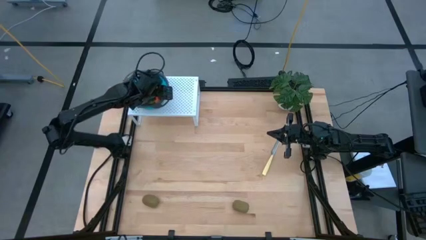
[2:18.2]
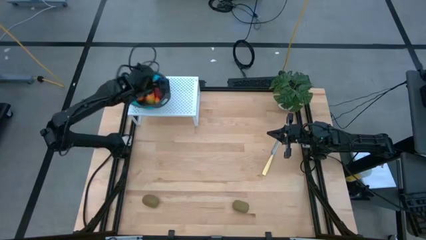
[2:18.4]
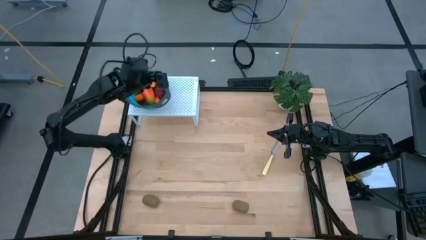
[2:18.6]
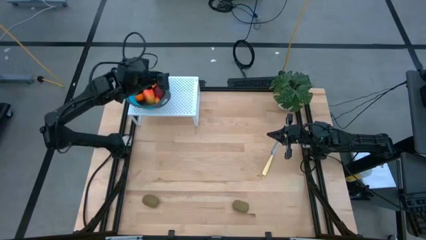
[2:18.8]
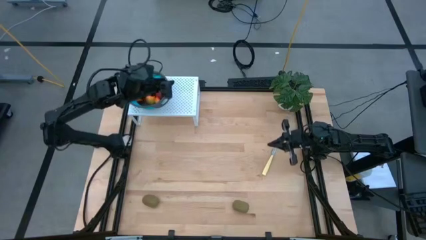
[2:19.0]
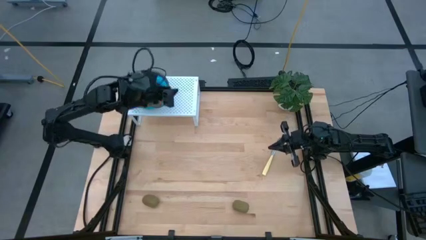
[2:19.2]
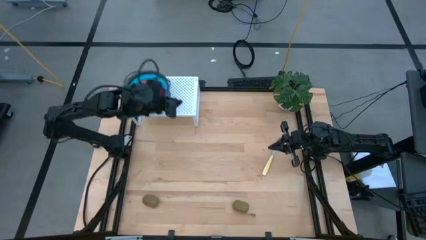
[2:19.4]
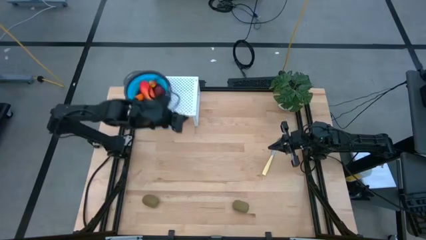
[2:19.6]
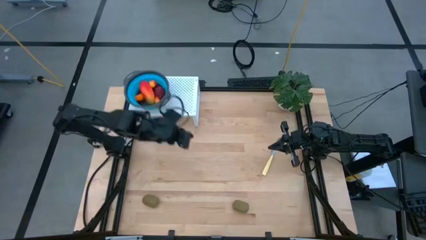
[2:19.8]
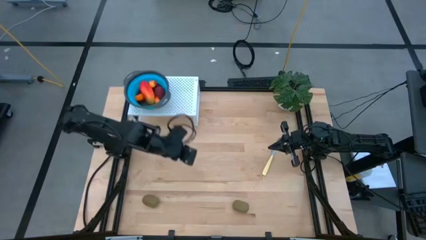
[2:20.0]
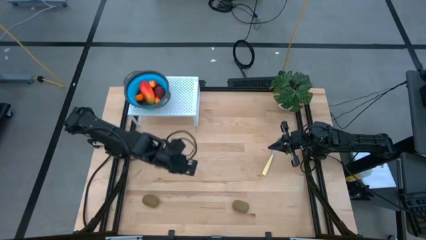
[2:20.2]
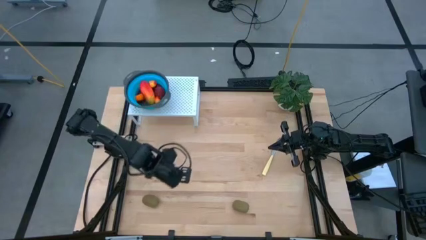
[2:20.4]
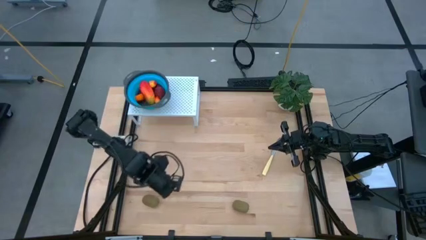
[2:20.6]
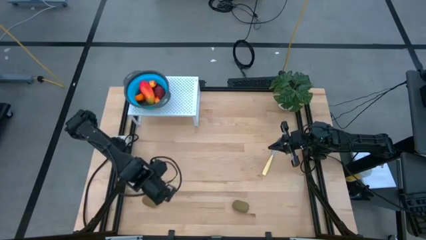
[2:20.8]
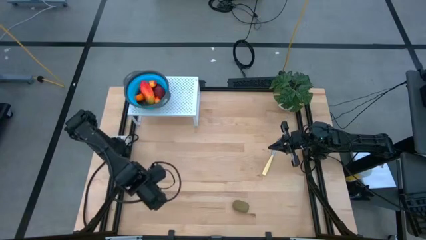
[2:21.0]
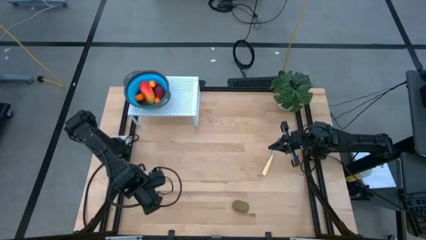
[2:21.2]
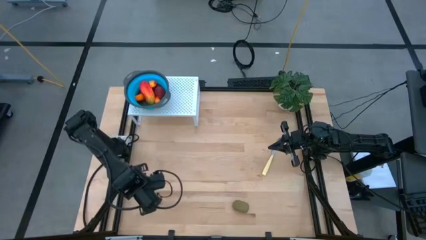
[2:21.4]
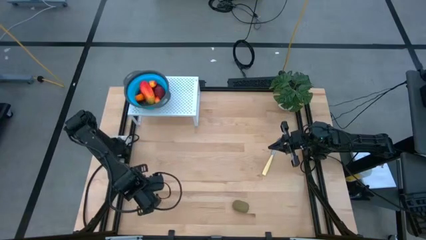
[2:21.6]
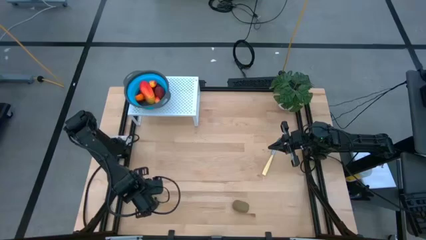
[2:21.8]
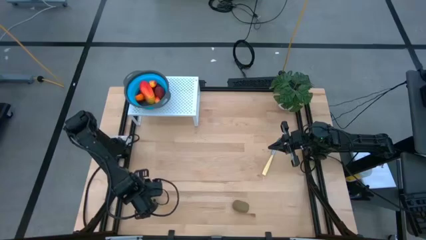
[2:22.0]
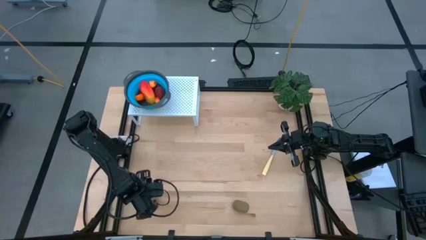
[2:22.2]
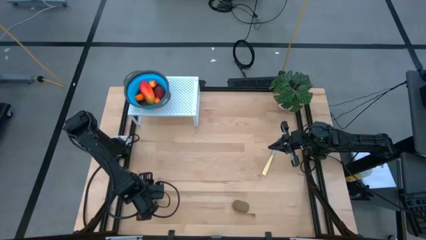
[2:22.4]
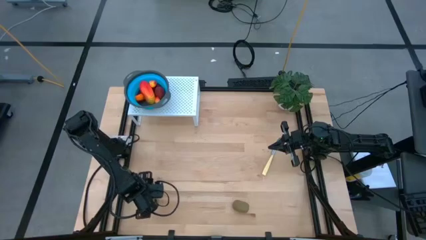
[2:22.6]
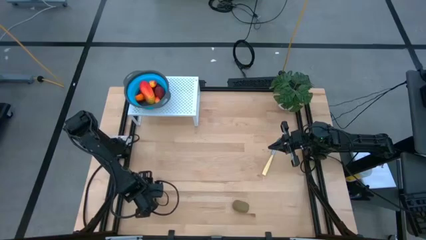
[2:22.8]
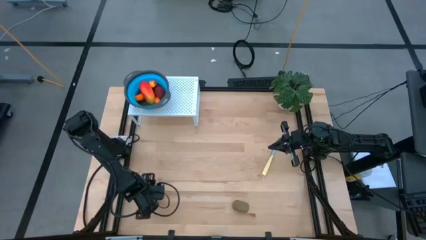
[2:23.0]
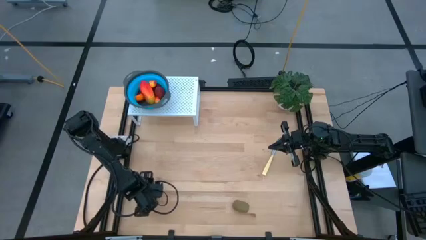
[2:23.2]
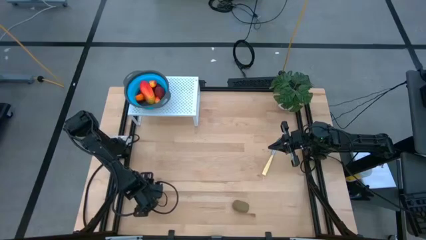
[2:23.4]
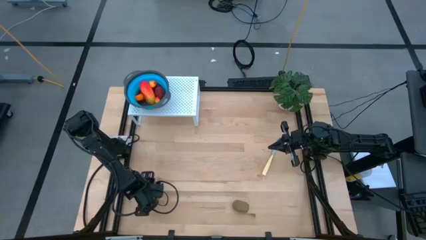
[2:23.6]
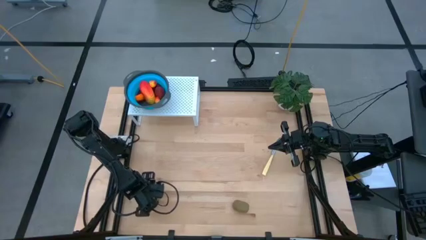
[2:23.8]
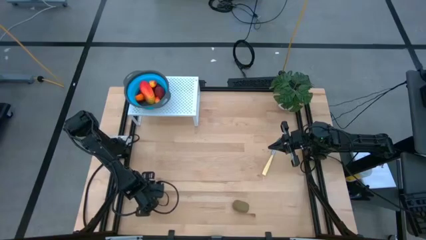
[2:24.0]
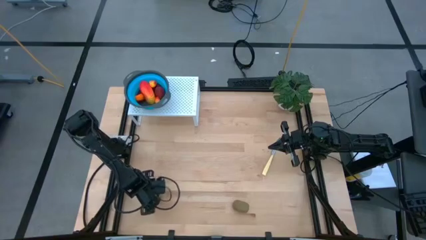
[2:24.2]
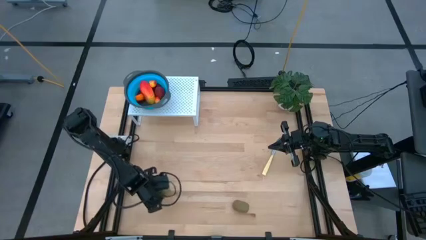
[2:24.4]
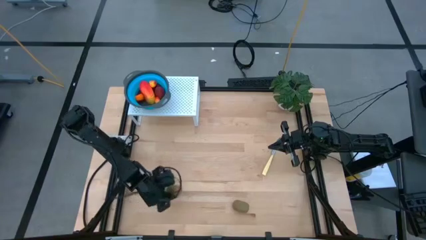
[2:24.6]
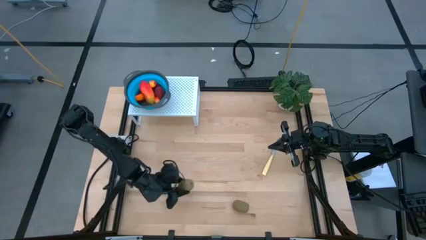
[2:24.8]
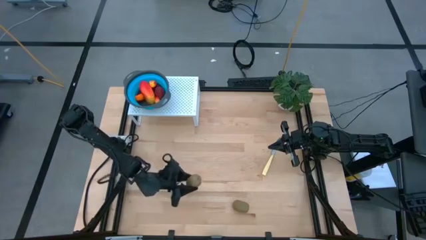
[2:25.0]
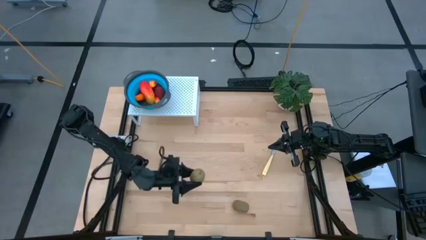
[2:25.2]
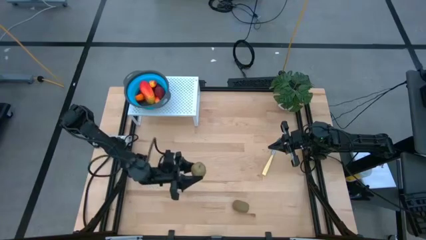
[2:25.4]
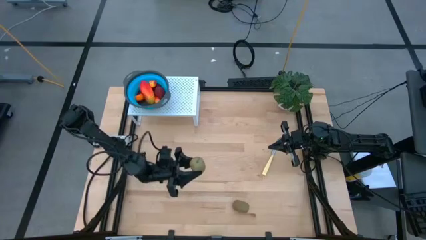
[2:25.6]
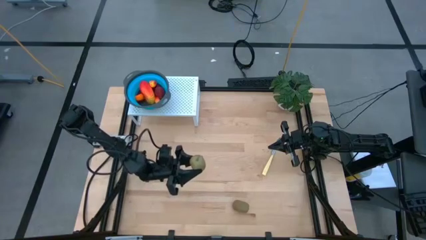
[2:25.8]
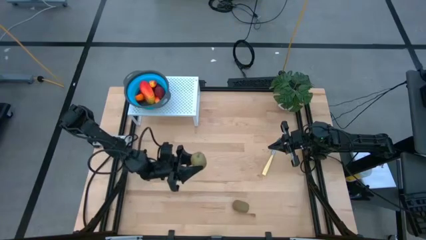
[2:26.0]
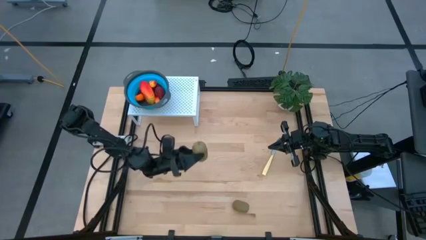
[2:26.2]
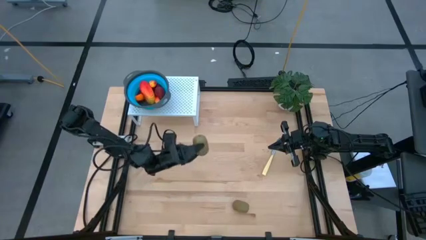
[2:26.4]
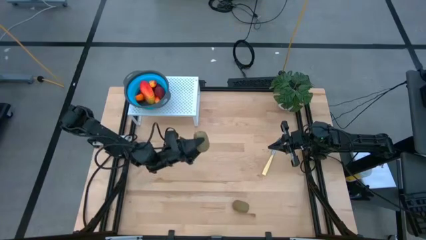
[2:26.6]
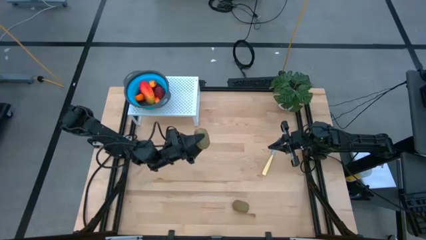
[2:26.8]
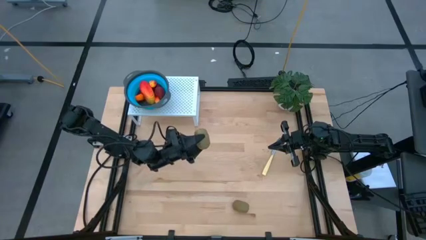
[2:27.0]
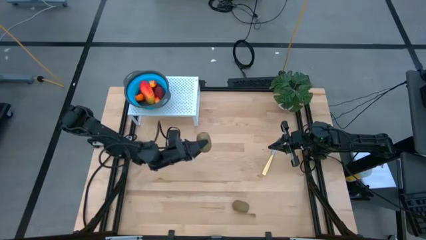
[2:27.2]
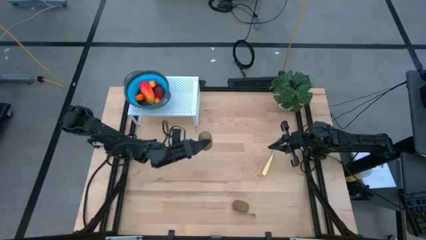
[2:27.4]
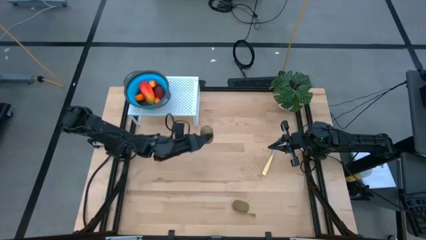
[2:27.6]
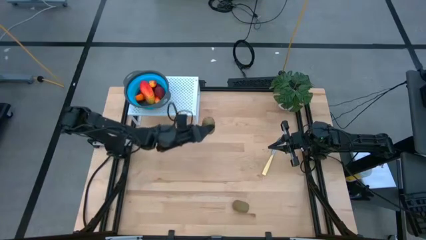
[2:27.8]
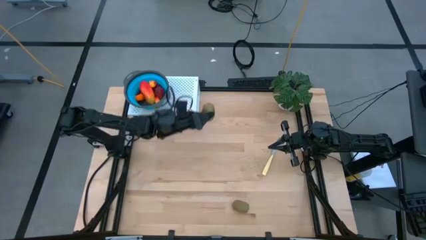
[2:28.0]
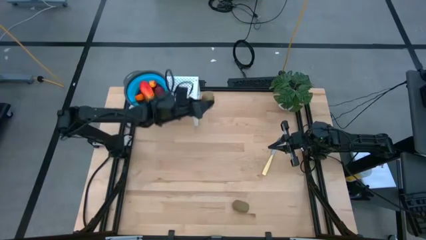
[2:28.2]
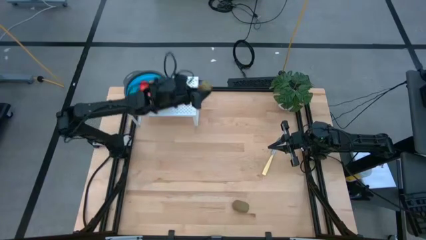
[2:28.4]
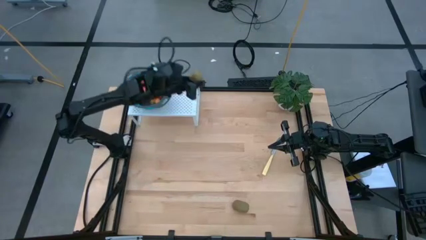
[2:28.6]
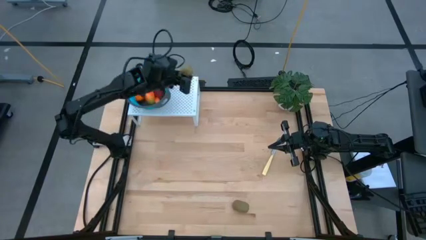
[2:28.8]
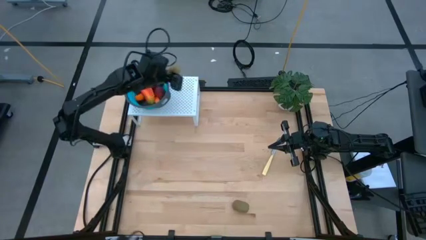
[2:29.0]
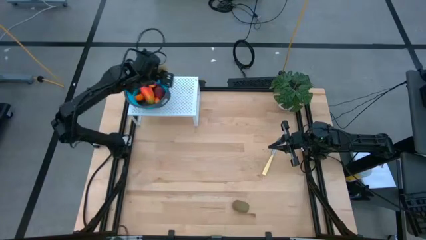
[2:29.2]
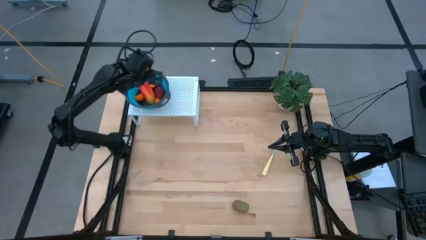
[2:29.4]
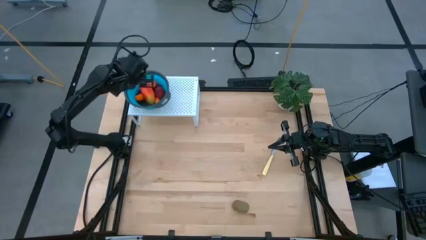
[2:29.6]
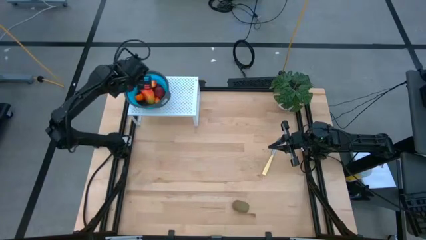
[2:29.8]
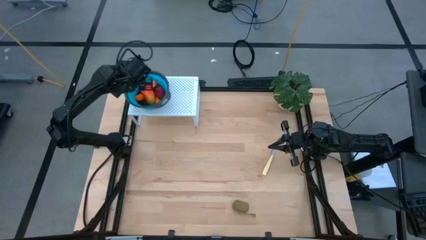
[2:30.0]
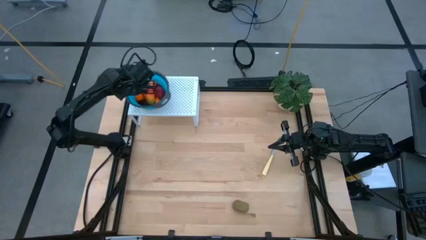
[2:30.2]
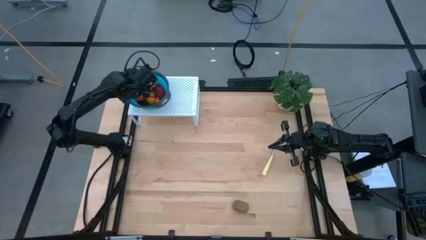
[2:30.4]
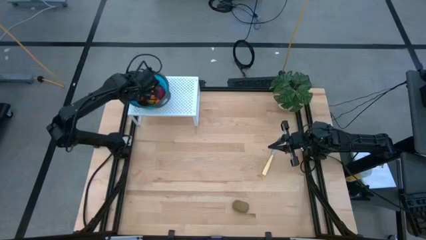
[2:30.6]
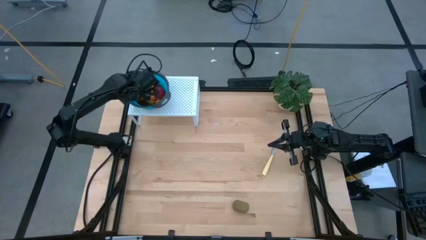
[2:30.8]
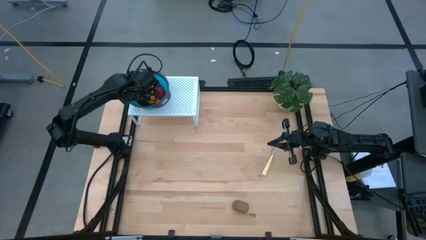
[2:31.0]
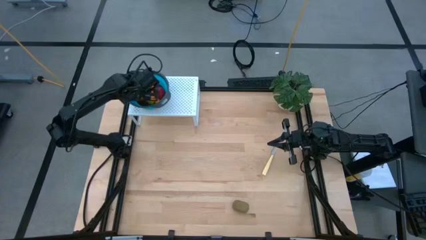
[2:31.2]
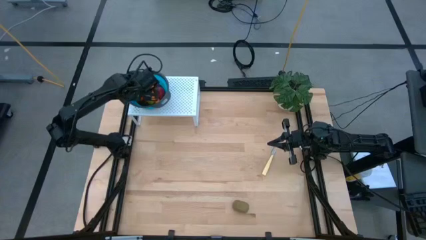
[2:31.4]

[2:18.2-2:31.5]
Task: Pick & Place Fruit
Put the left kiwi into the blue strainer bowl on the shelf

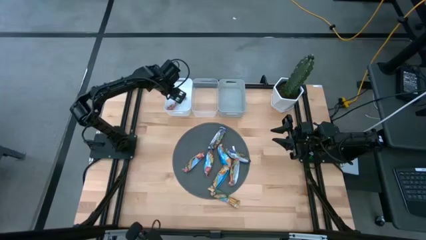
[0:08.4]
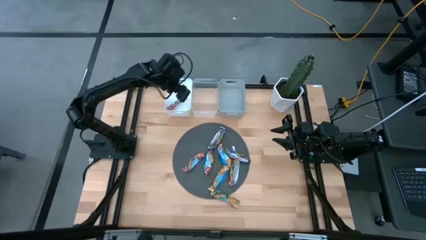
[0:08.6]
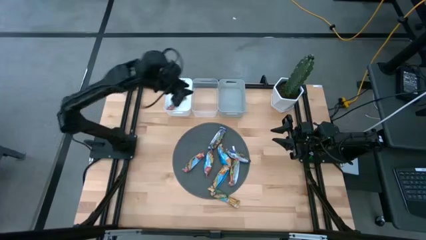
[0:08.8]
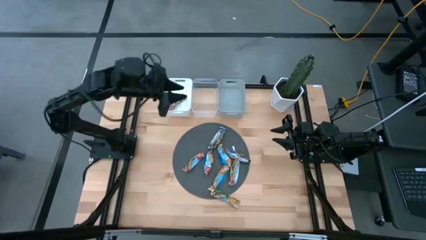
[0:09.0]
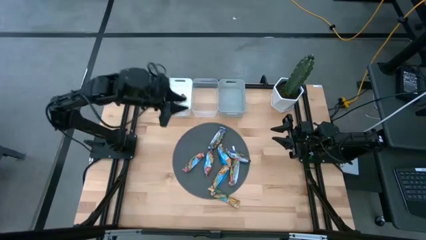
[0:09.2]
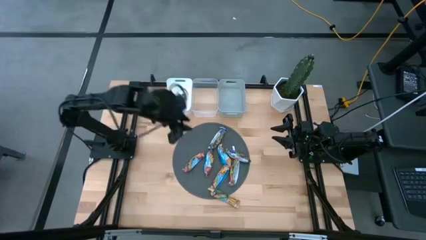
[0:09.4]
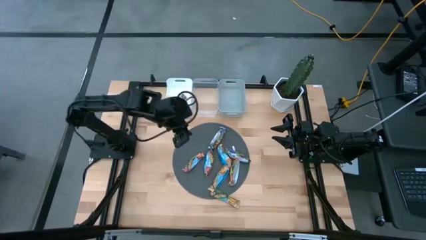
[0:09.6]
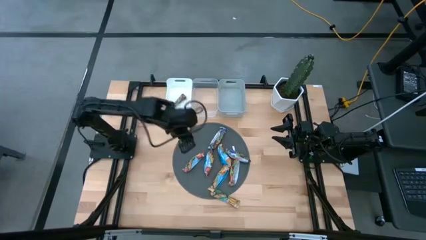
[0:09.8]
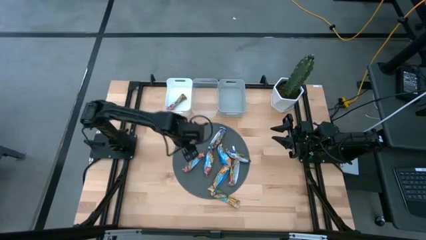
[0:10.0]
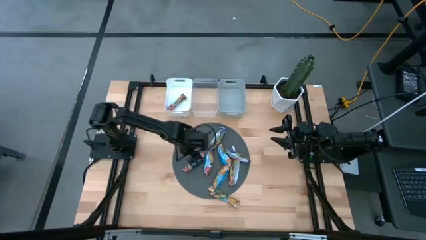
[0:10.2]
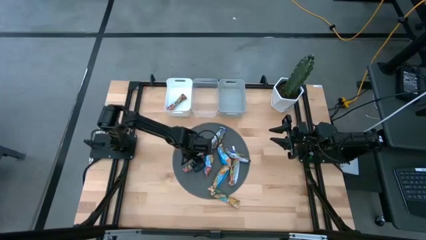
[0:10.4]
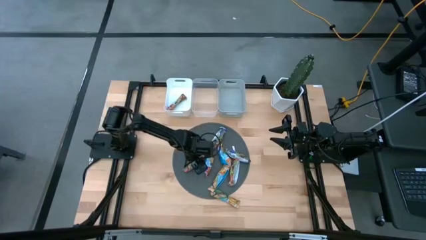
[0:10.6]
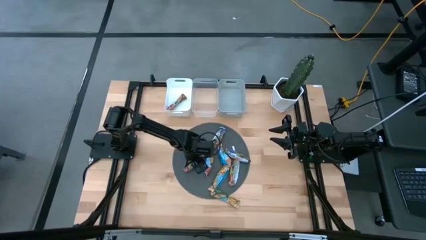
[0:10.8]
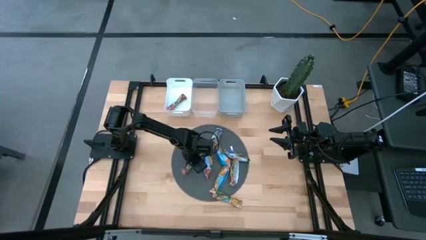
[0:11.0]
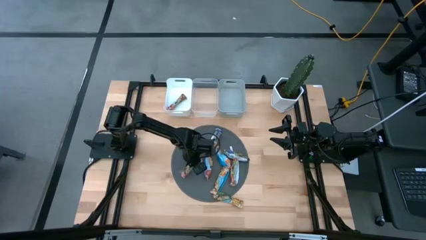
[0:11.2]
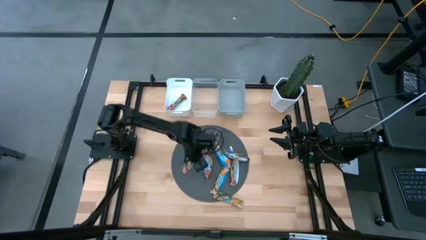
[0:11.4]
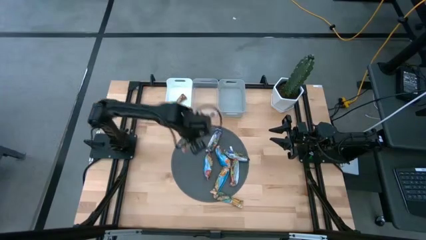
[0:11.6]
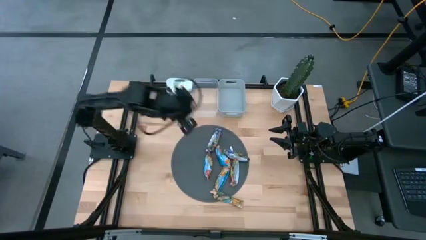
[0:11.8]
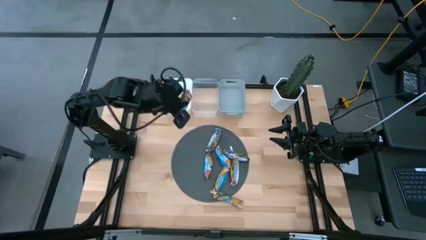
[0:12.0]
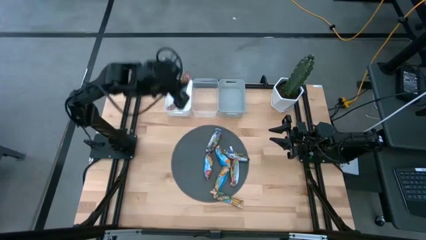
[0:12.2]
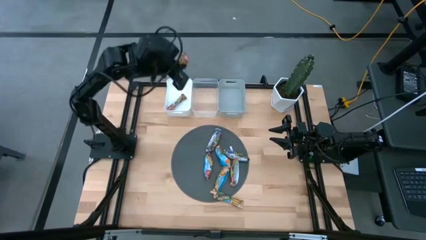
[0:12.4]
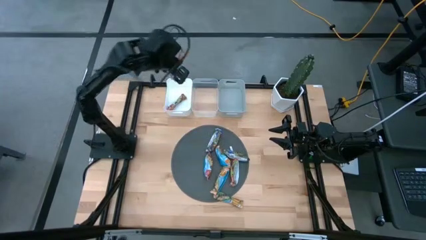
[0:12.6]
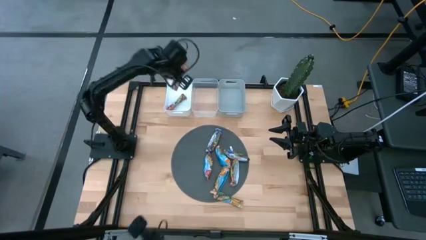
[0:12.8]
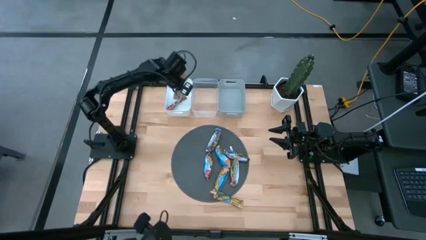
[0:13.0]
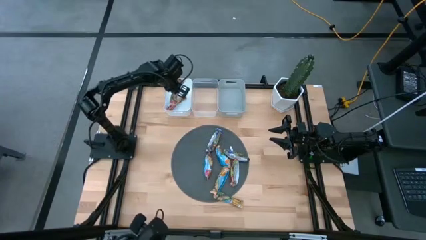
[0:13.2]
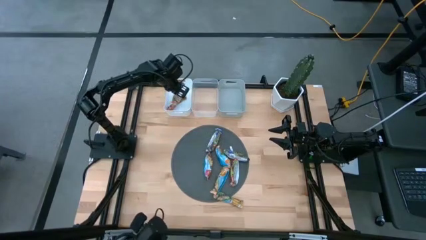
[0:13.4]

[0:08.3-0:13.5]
Task: Pick and place Granola Bars by type
Put the red granola bar into the white bin
